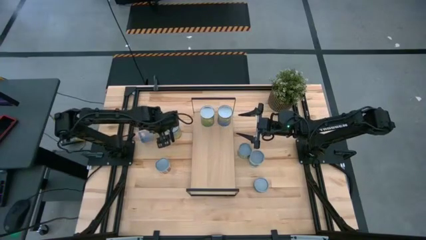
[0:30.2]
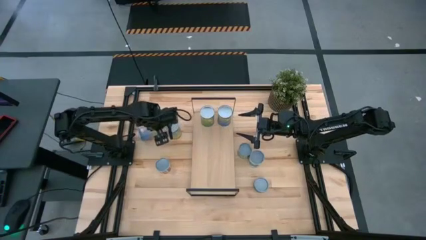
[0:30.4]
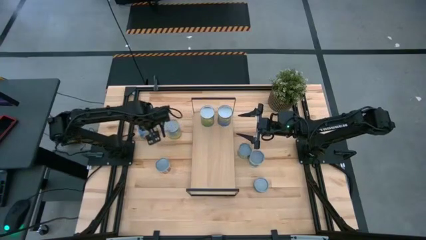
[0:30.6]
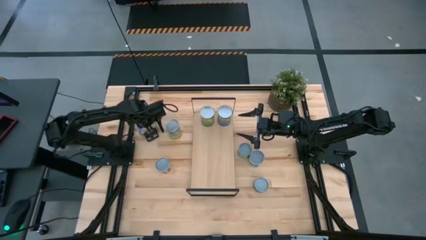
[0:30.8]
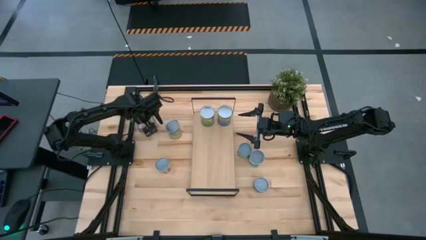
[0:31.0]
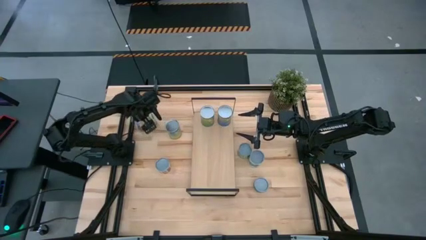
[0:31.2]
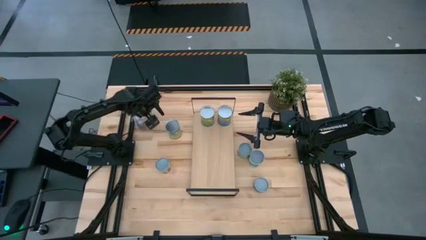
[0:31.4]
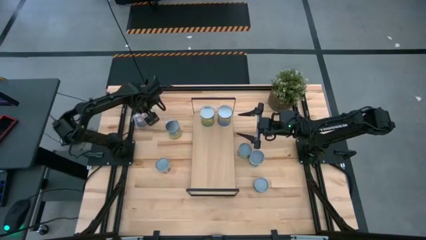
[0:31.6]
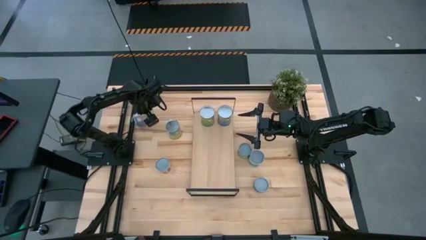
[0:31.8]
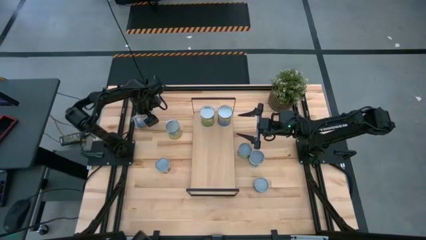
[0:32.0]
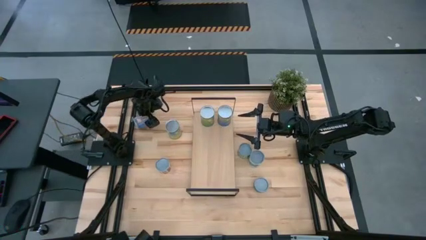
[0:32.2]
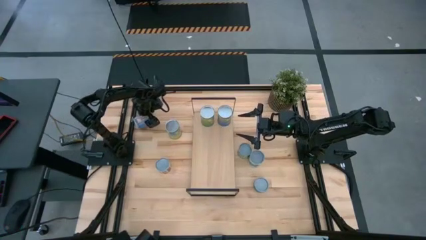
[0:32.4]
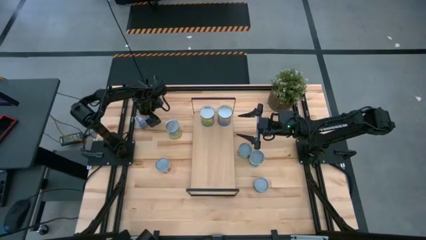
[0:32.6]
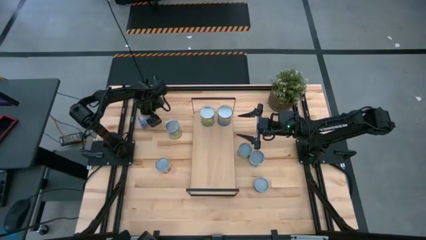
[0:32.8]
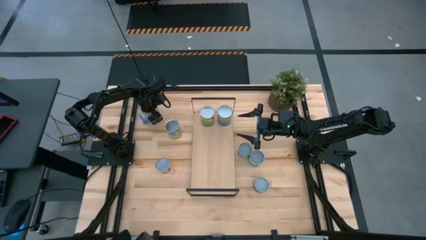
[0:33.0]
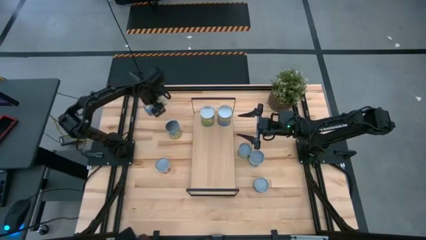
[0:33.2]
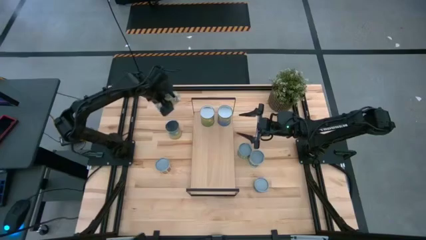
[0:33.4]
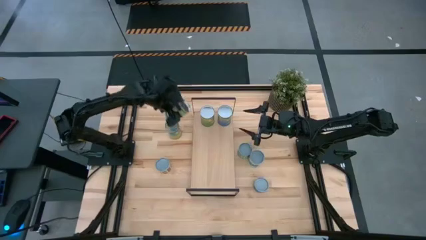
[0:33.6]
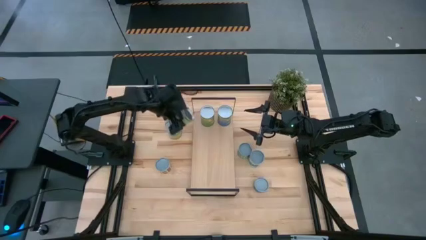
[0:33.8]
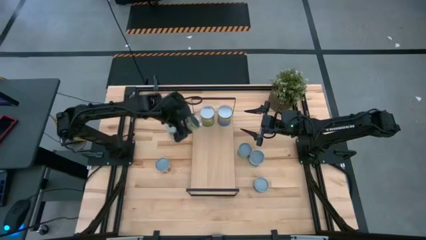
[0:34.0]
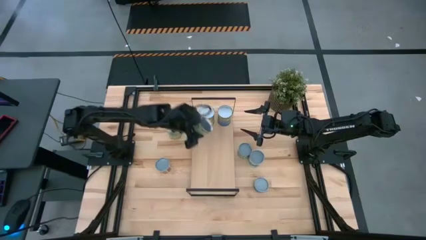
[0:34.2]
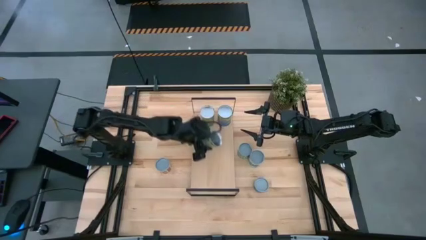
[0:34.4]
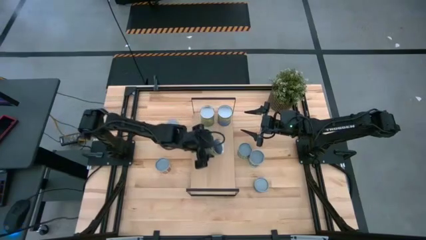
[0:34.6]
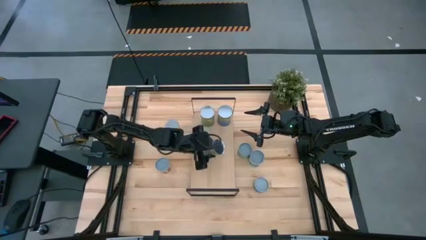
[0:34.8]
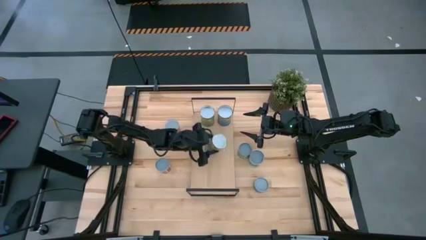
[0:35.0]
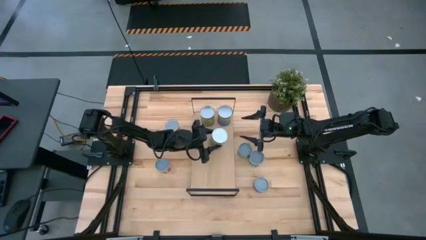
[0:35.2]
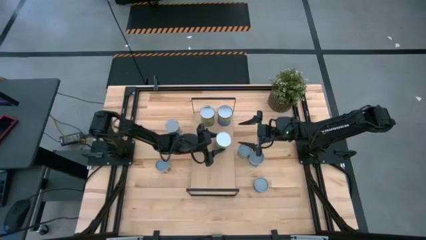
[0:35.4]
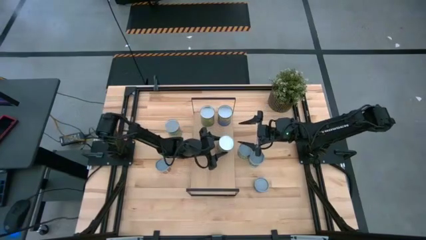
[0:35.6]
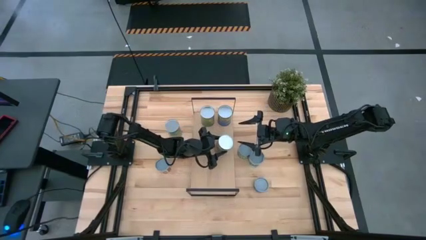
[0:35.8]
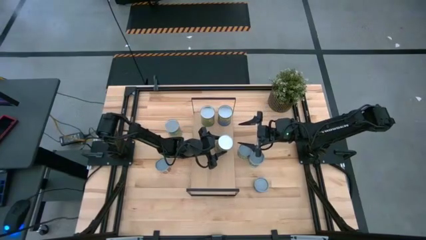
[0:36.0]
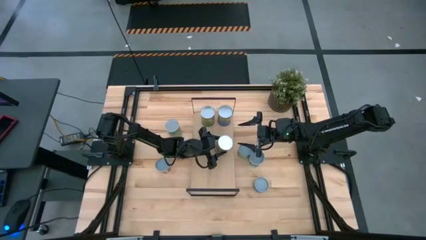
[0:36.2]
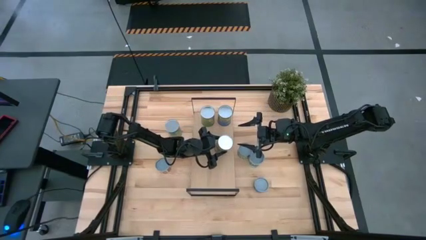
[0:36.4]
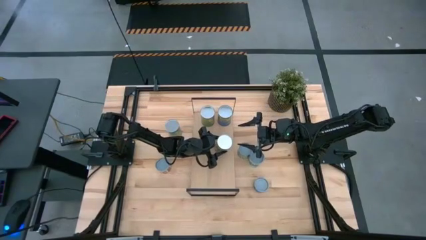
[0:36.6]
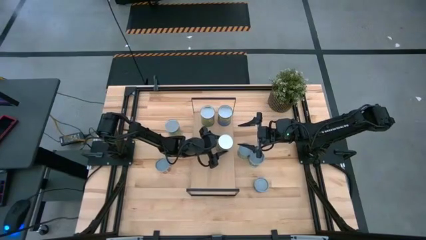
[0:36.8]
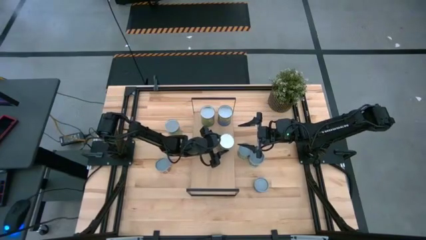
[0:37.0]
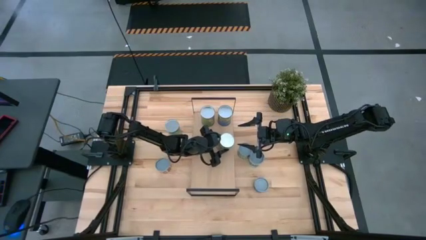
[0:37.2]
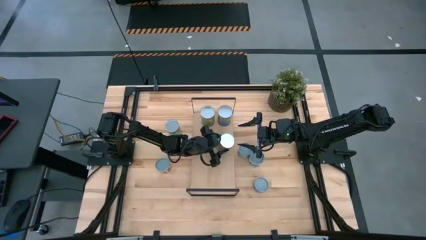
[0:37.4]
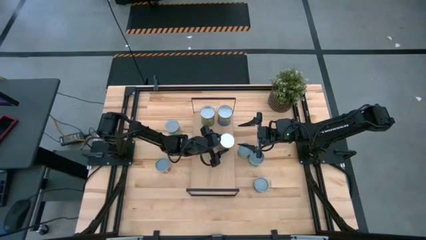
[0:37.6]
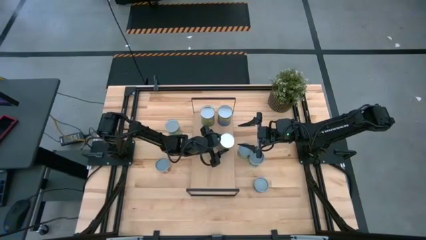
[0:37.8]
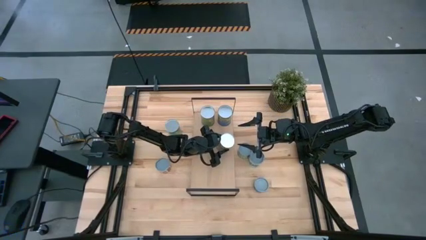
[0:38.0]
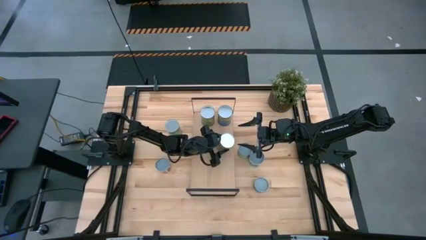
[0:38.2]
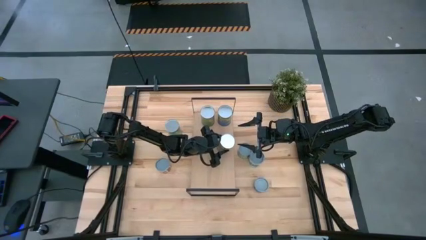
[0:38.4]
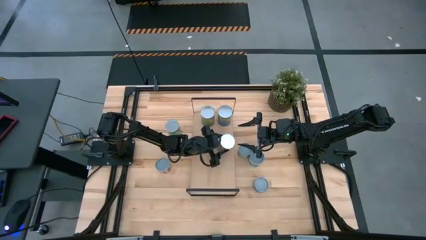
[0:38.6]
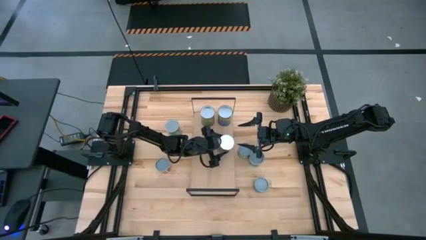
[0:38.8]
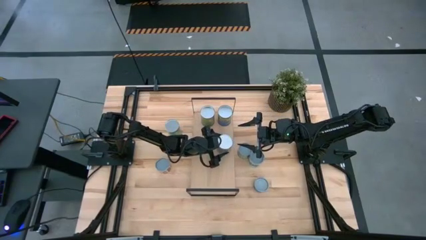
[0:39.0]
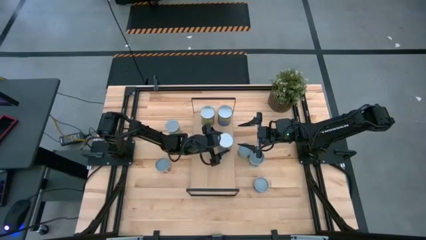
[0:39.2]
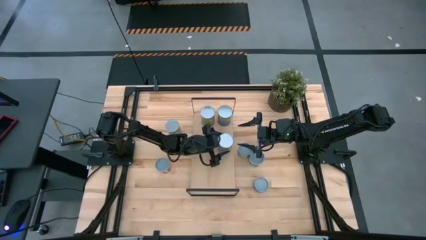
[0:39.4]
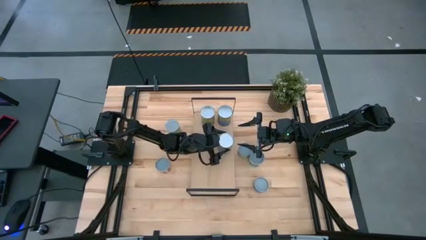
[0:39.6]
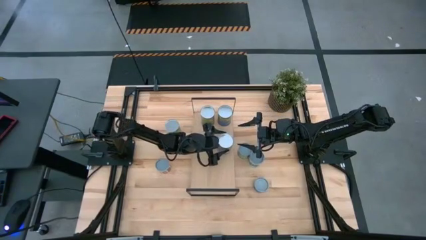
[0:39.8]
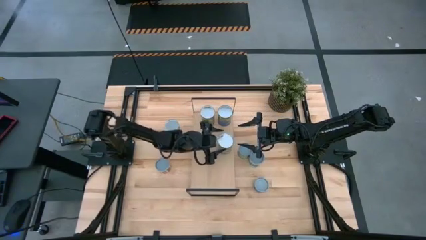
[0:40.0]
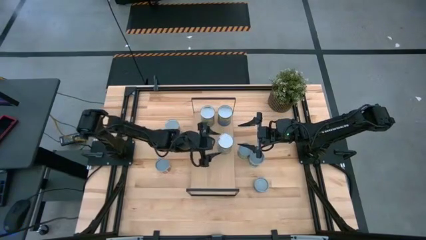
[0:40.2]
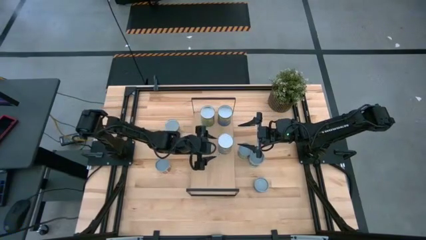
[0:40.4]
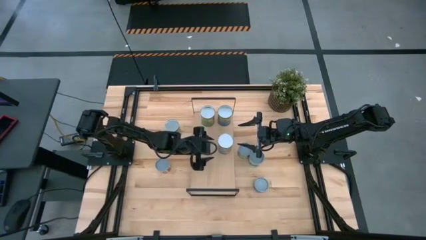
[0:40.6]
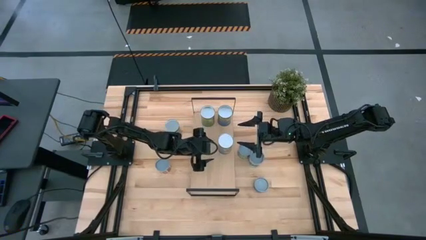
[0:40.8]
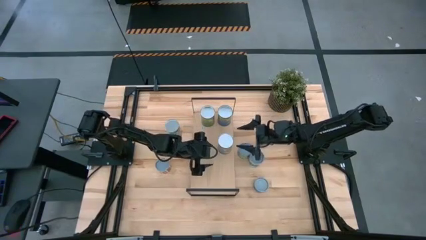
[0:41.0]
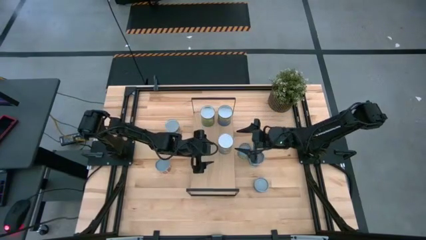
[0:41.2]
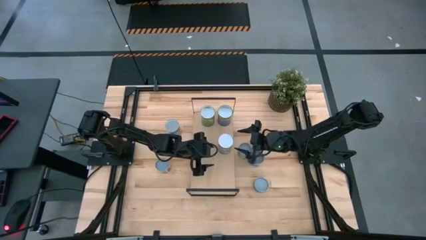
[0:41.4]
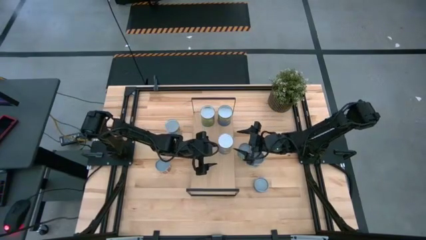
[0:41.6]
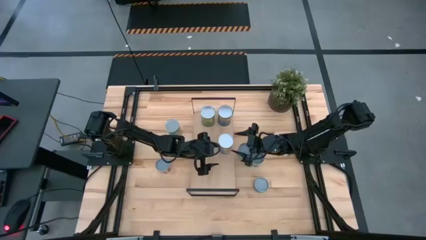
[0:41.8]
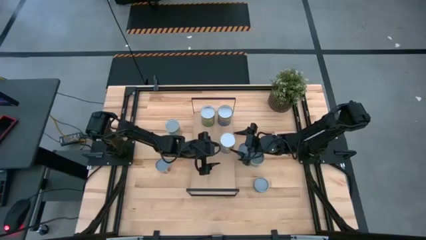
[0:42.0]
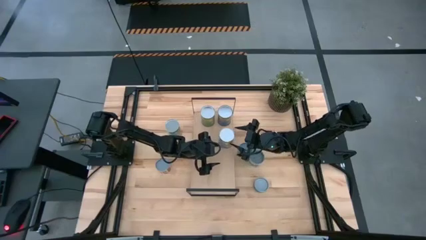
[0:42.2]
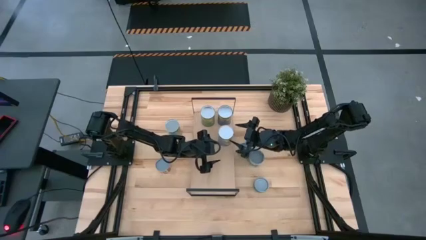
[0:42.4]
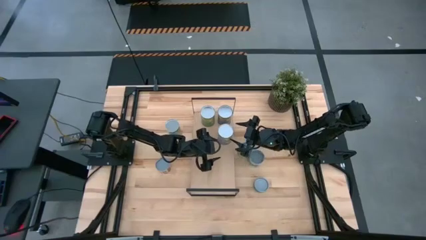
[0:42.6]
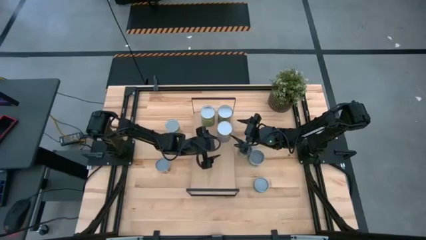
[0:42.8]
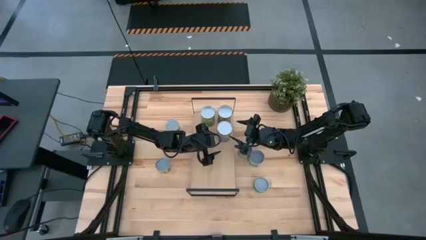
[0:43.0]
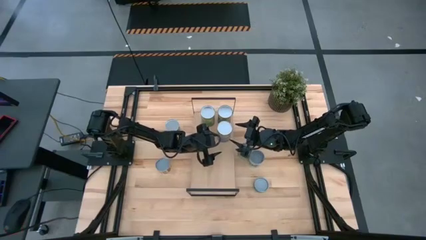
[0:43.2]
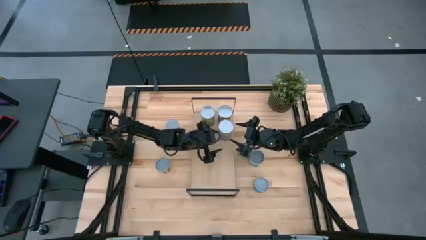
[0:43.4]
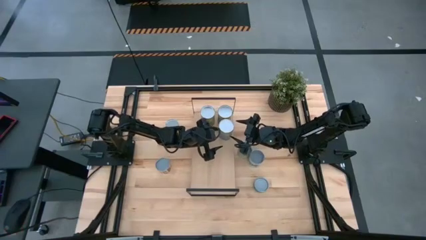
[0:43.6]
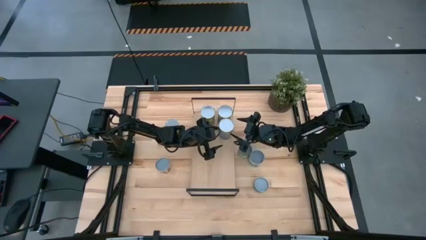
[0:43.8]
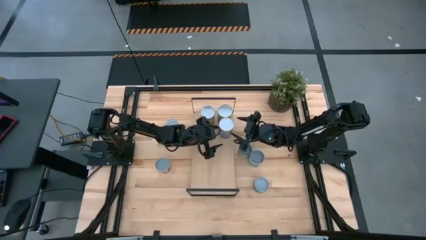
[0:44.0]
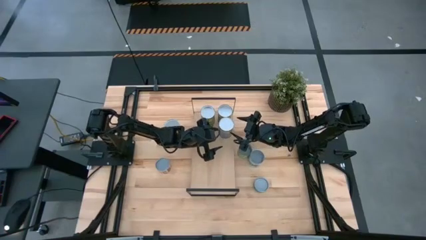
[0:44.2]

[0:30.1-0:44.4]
Task: Pick and place cans onto a shelf
Put the canned peaches on the shelf
